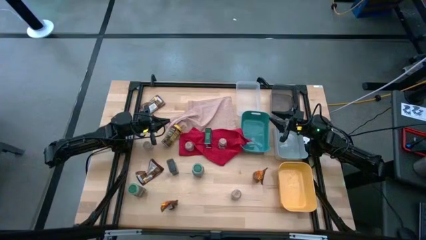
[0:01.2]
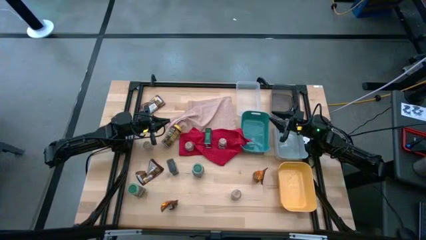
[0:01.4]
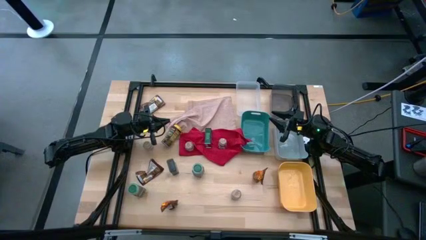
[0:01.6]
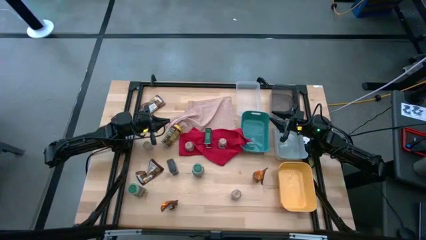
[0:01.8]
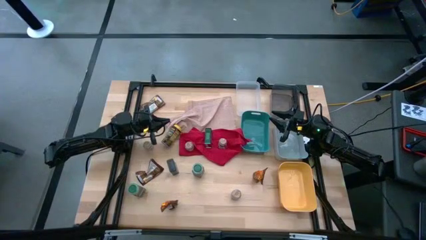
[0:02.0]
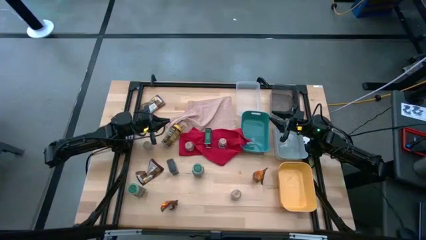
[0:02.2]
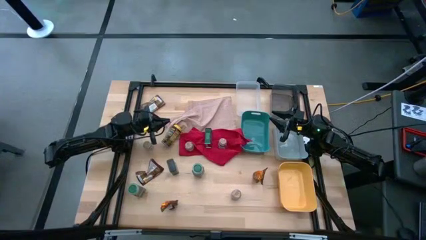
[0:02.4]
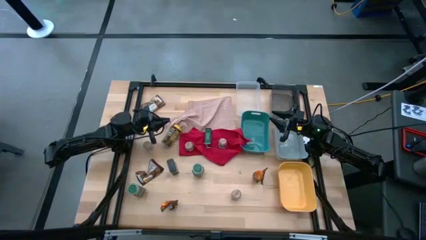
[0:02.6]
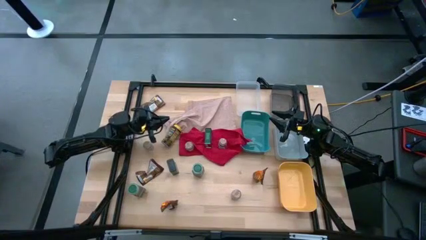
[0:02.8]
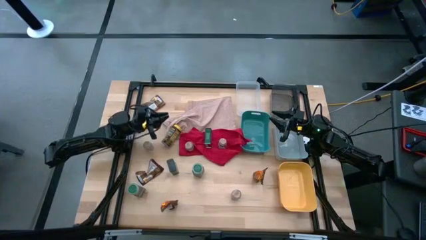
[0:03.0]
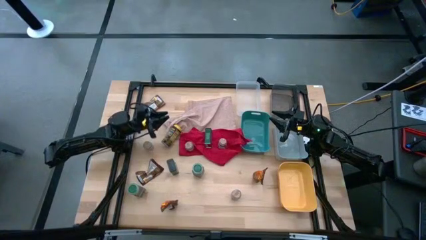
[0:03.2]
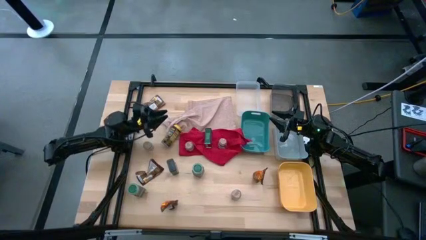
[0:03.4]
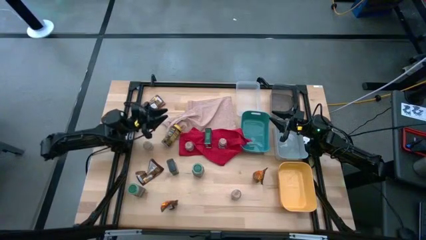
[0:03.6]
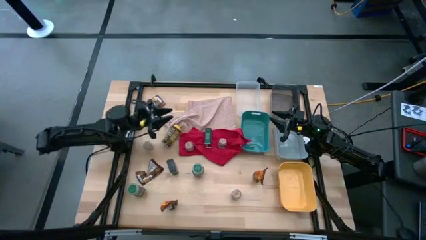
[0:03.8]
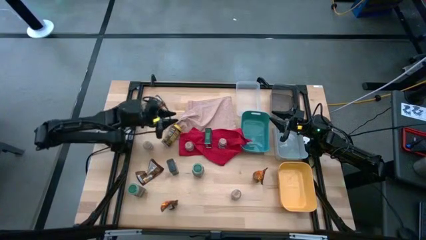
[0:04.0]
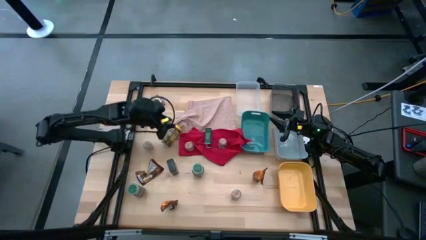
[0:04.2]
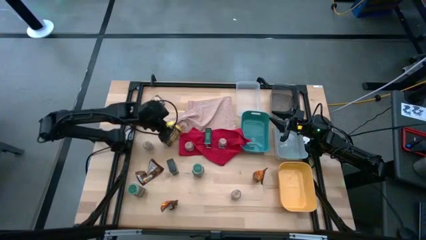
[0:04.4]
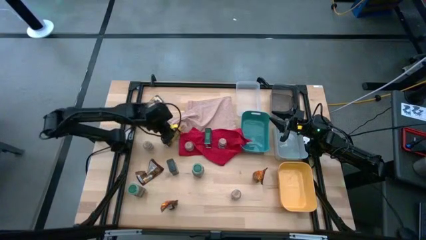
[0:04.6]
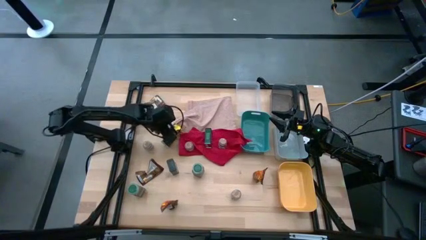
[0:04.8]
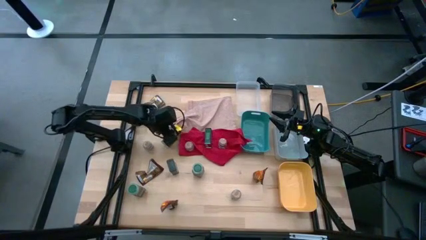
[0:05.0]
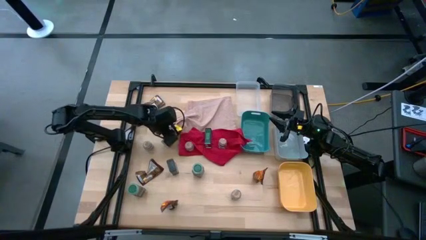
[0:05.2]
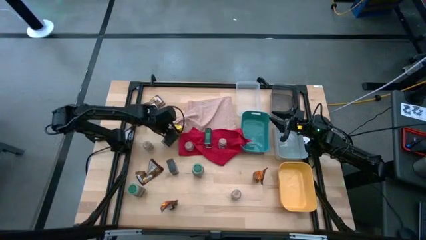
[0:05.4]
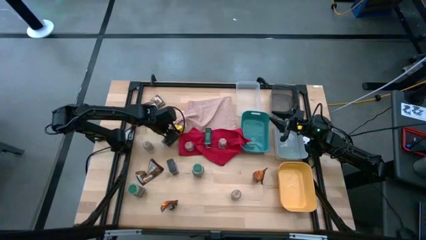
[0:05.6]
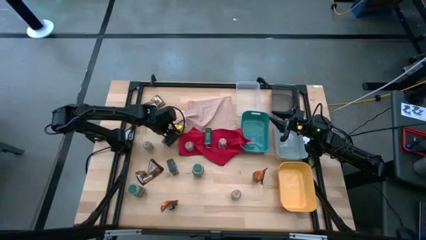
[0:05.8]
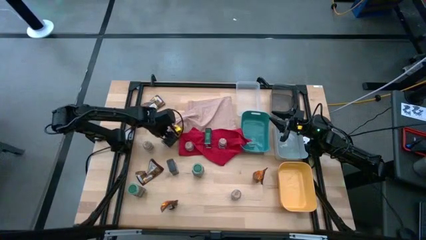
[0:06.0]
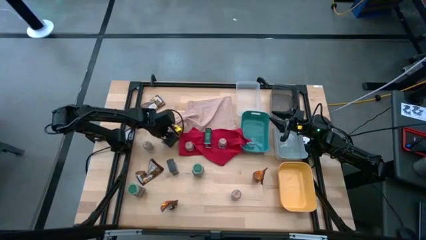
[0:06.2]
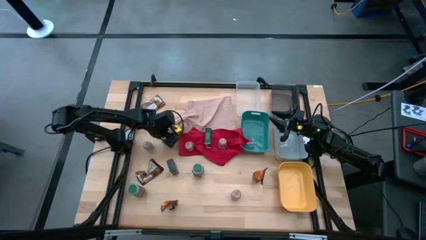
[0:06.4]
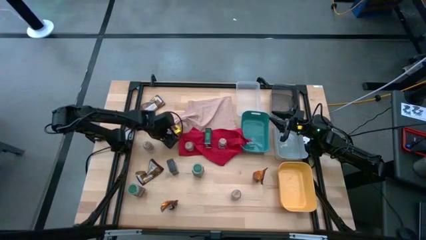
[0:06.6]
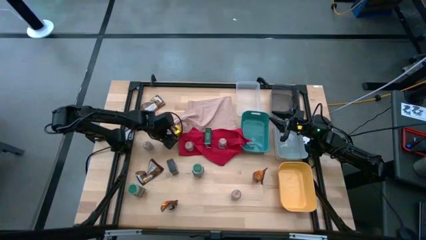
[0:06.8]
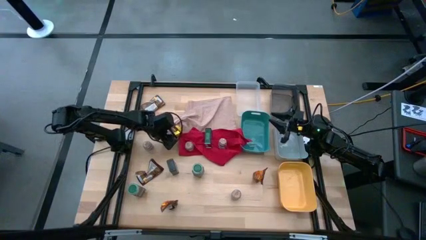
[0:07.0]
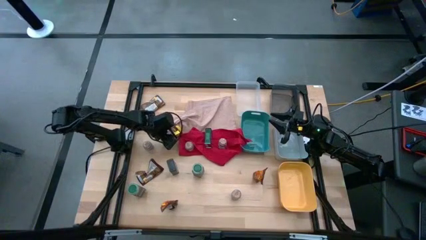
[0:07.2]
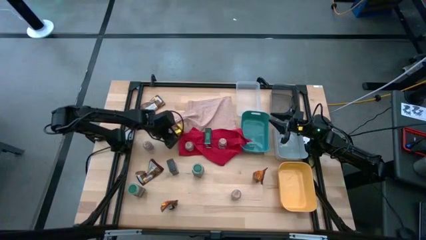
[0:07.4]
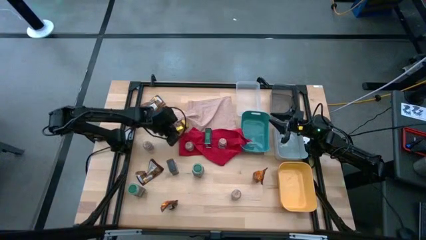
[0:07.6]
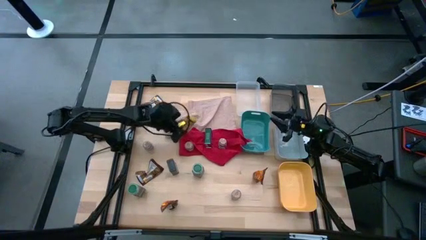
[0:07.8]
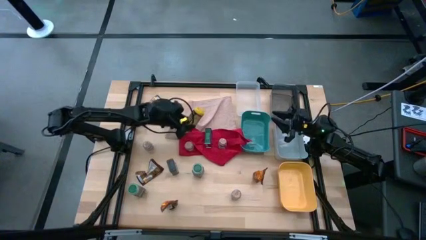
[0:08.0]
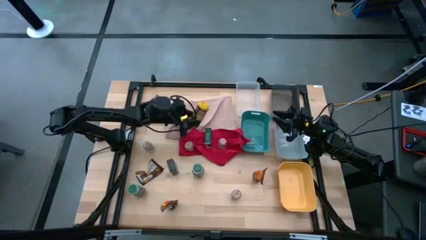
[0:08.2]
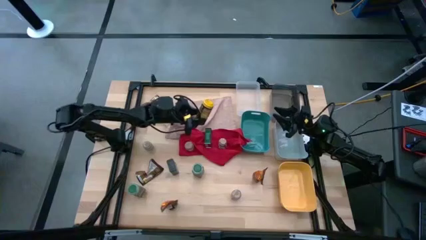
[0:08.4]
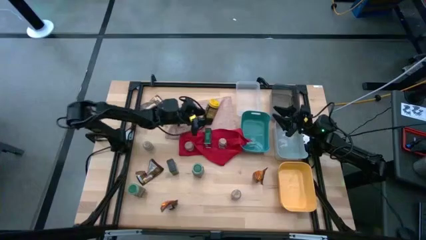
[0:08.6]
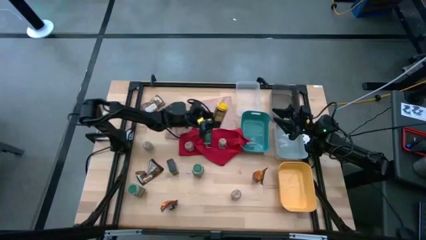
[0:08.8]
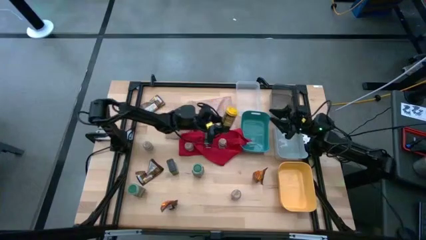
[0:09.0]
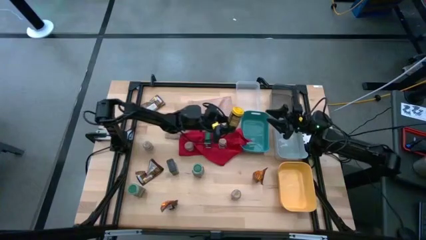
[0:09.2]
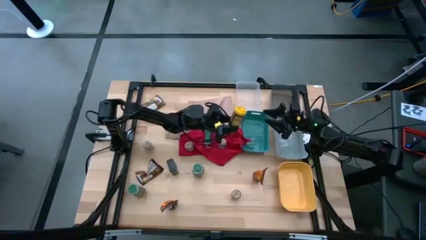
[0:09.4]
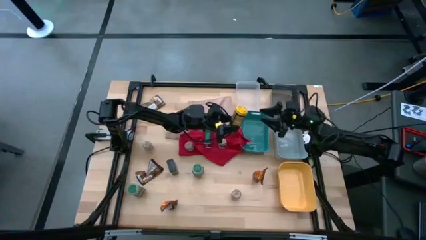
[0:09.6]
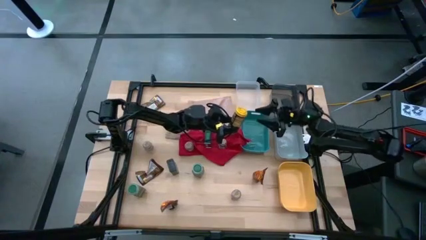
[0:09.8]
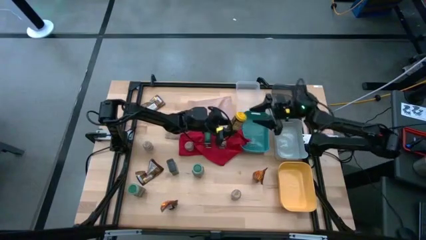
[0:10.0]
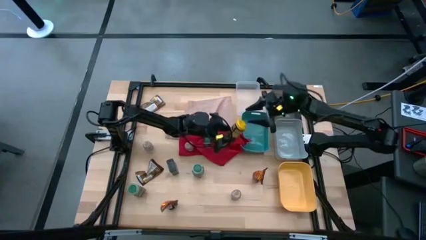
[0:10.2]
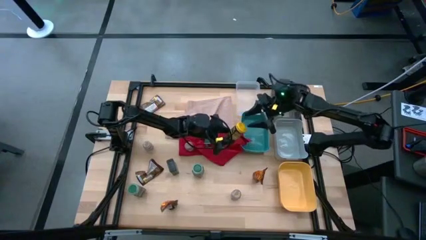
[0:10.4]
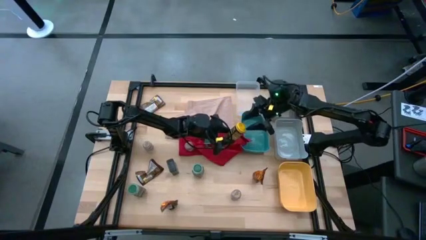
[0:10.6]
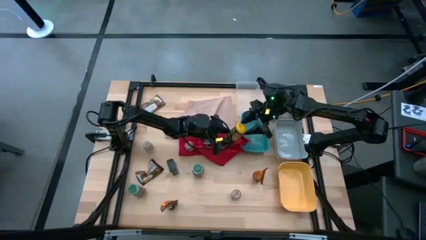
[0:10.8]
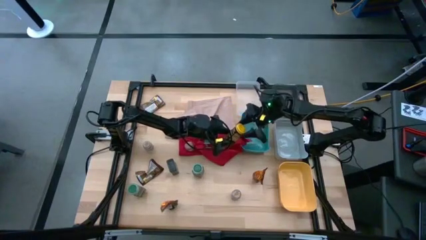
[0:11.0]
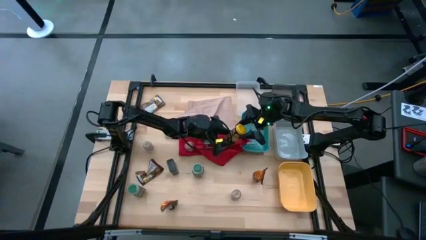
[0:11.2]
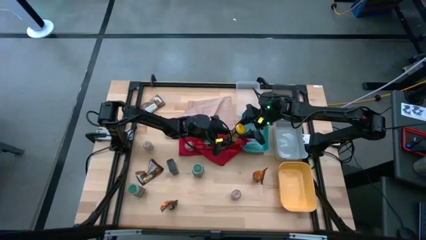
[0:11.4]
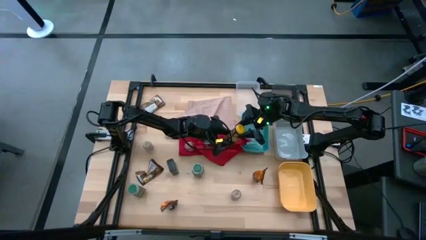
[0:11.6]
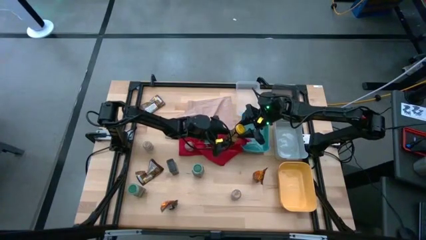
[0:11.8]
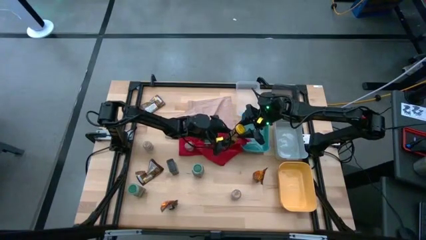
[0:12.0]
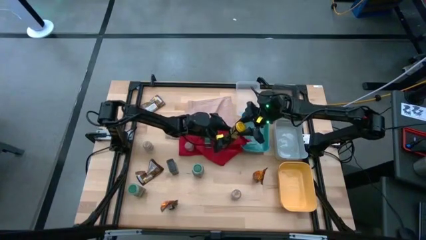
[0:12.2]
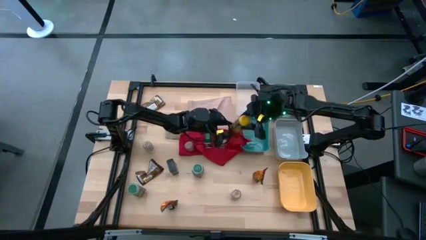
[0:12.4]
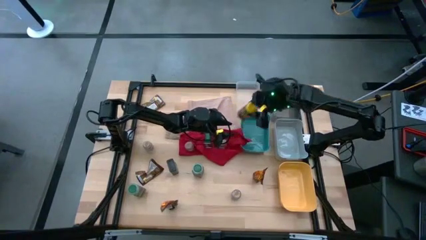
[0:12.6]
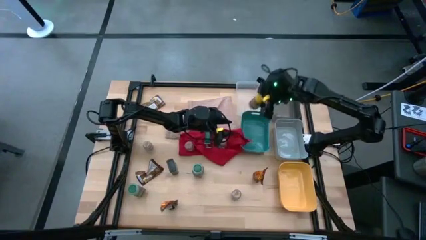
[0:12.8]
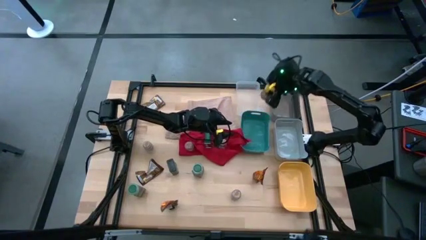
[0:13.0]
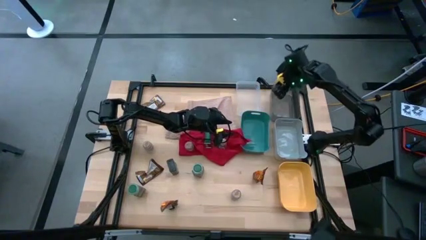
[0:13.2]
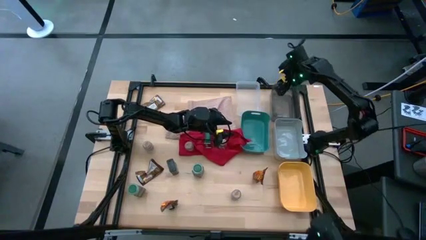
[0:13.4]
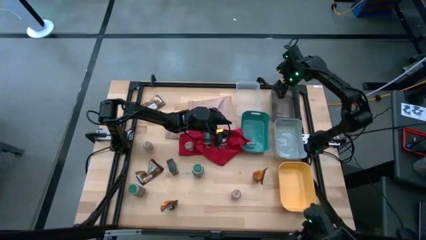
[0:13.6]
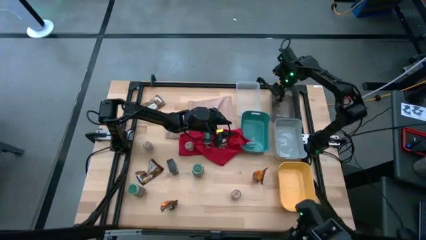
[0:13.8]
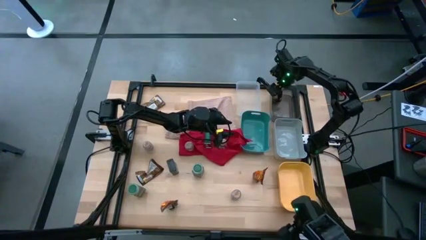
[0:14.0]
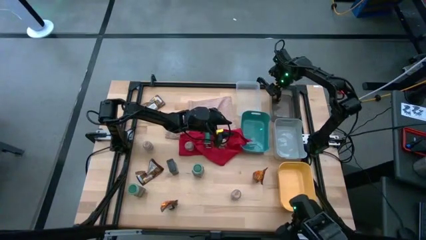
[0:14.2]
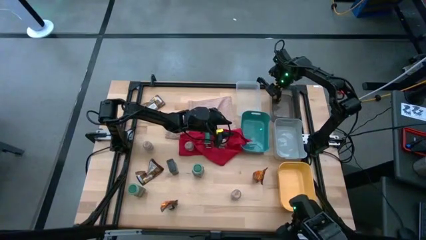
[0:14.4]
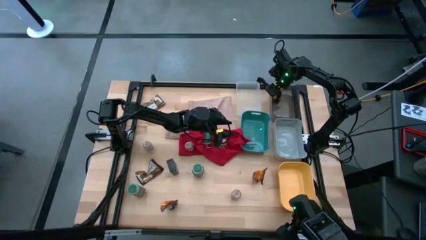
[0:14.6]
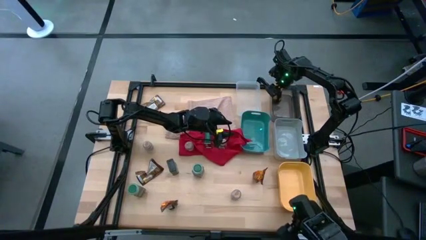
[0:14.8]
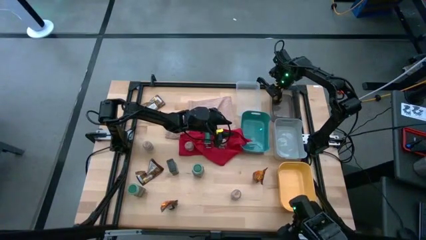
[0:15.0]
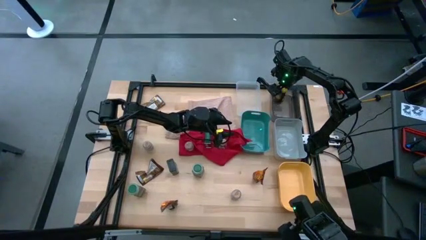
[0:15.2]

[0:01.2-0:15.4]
Task: Sort spices by type
Put the yellow seasoning can into the black transparent bin
